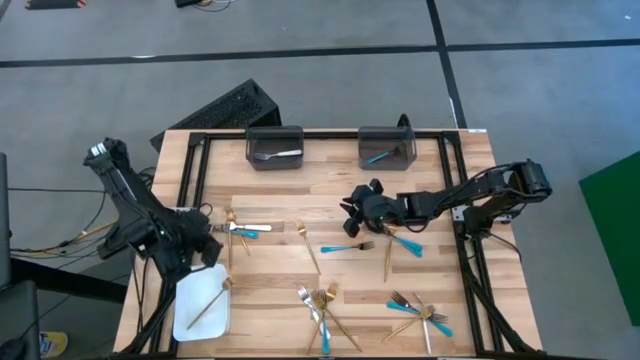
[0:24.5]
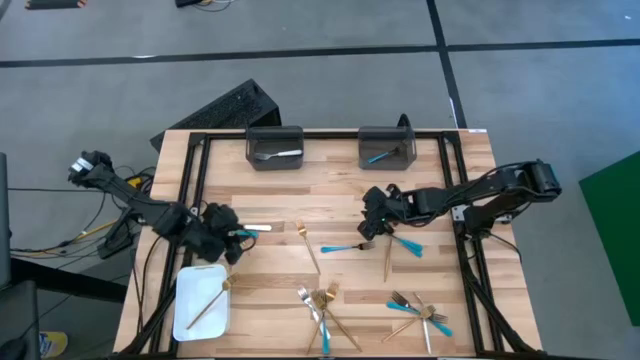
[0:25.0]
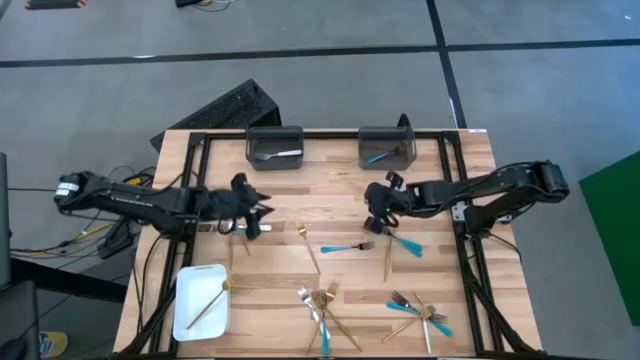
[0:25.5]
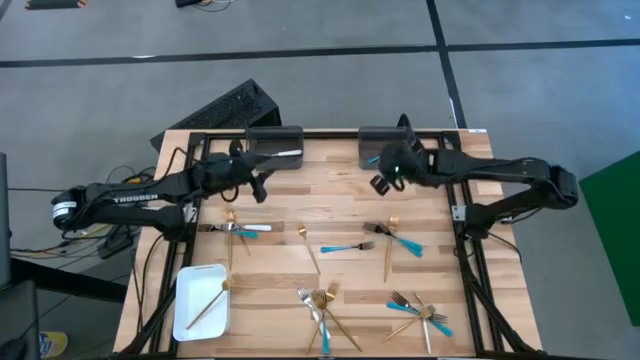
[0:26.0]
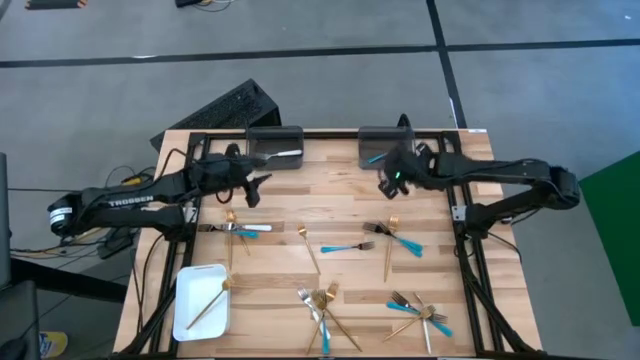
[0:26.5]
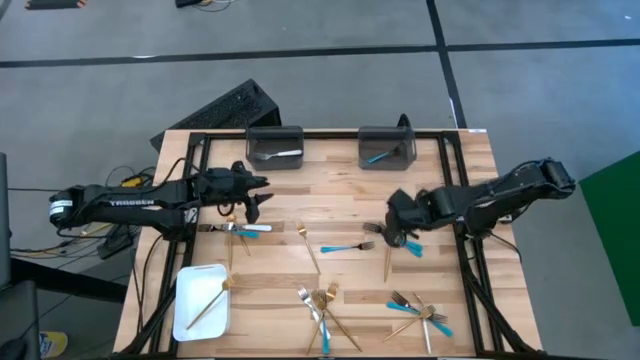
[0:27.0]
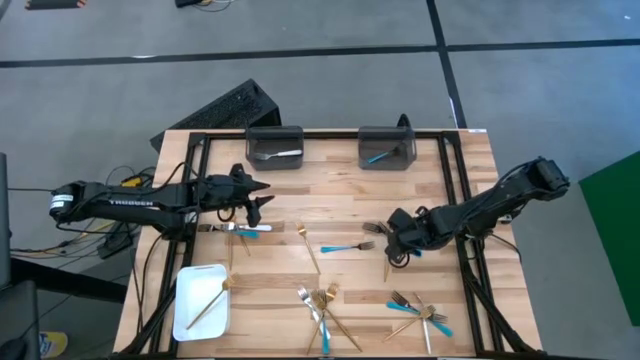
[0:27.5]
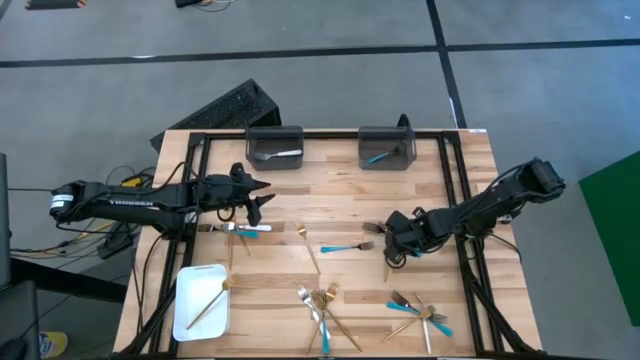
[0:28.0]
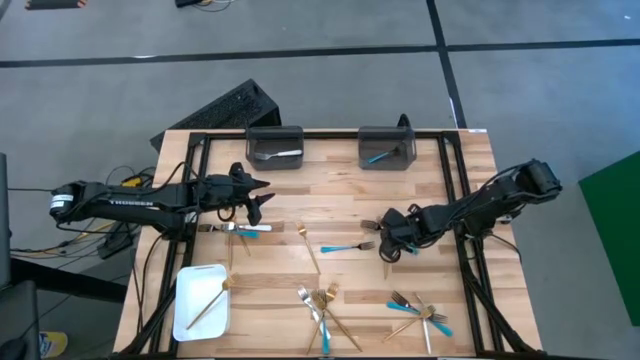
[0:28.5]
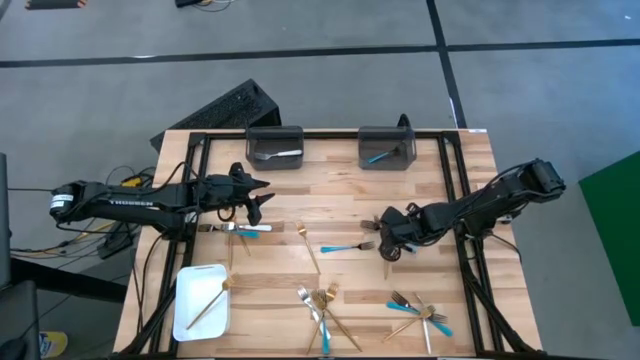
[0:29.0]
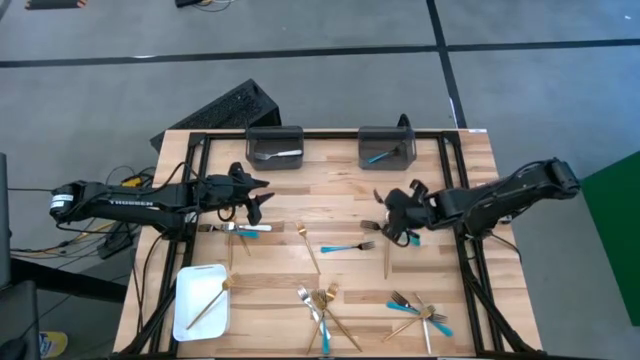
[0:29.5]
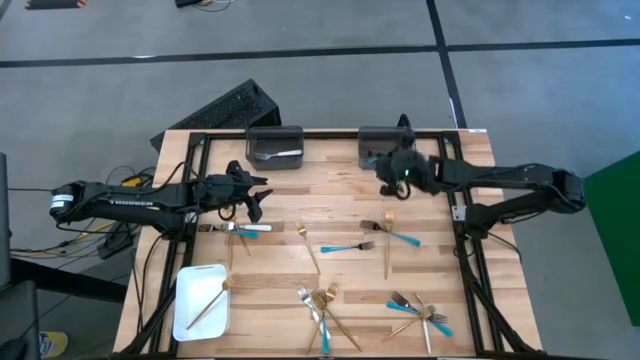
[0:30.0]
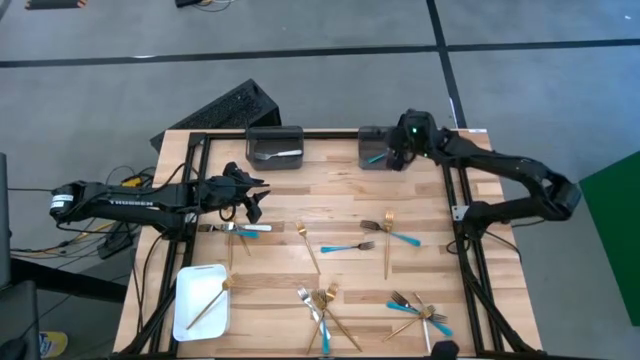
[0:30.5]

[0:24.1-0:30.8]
Task: Sort silverware by color (type)
Put the blue fork into the right black bin

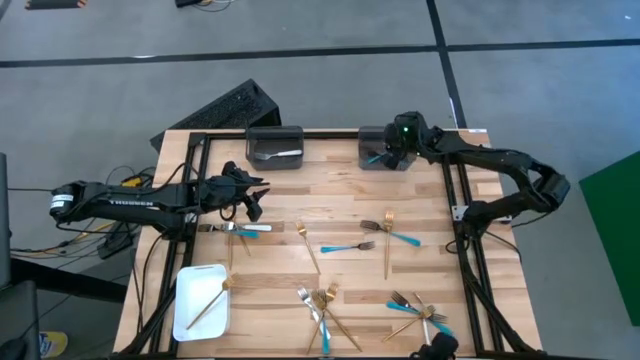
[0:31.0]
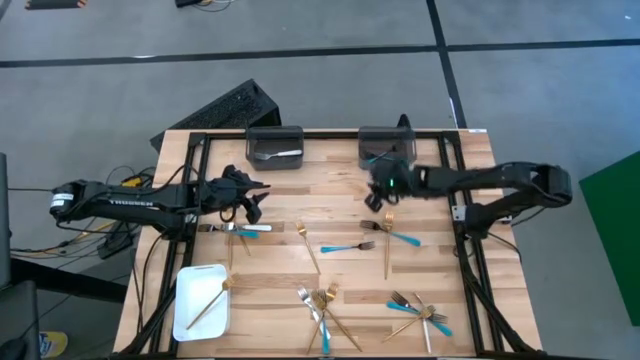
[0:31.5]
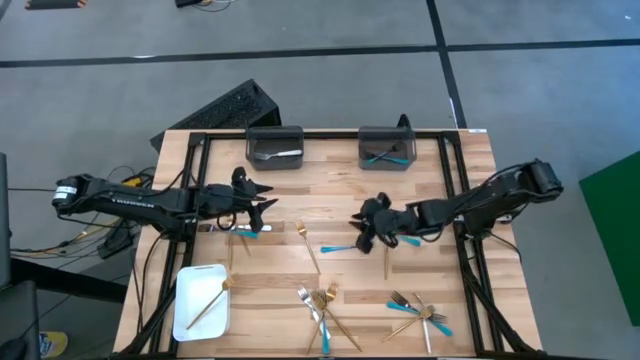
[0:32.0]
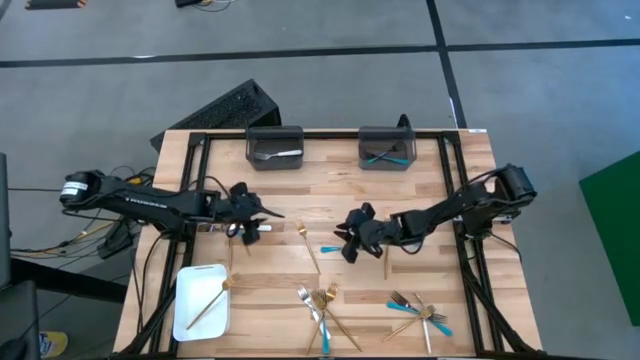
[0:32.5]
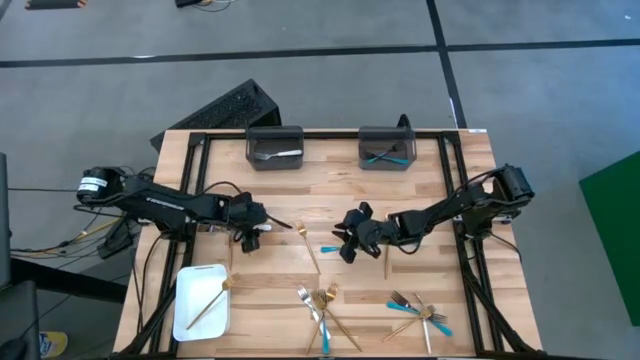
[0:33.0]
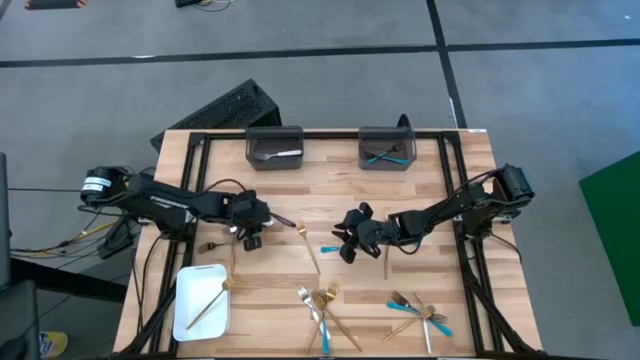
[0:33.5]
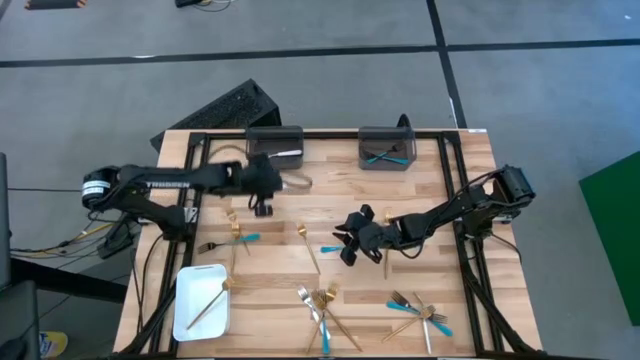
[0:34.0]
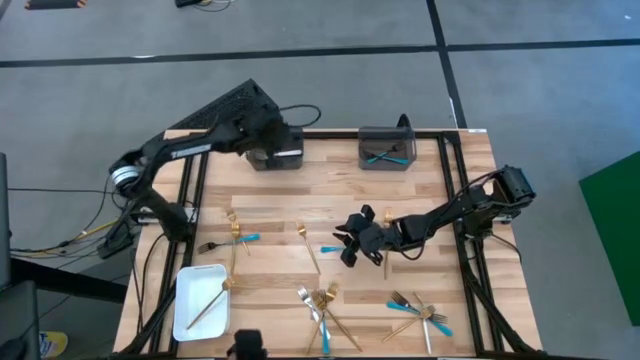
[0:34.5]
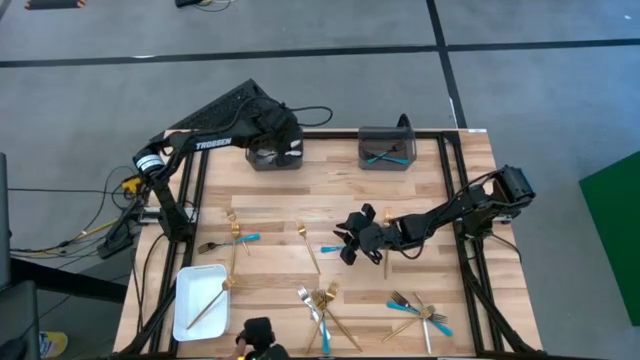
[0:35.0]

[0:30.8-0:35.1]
Put the white fork into the left black bin

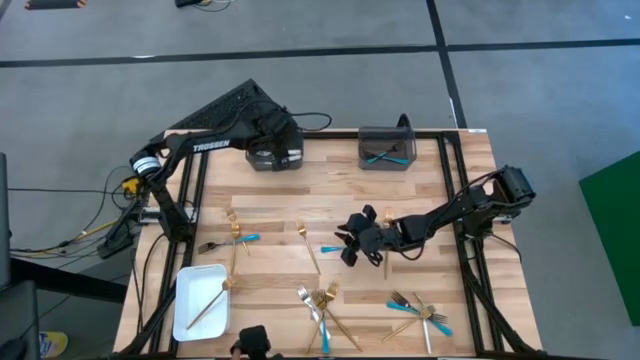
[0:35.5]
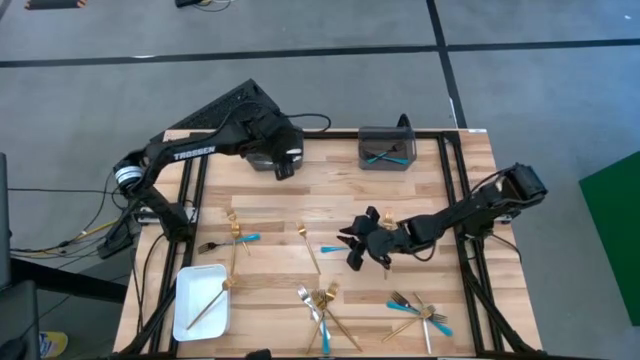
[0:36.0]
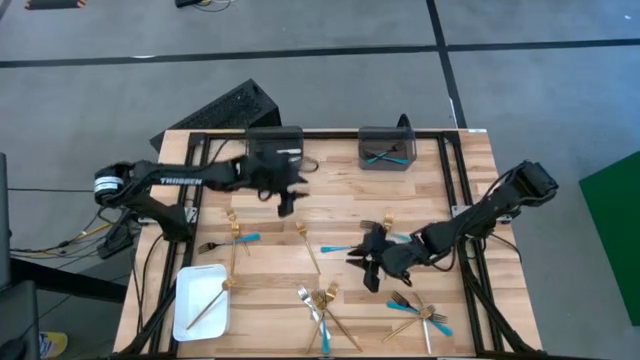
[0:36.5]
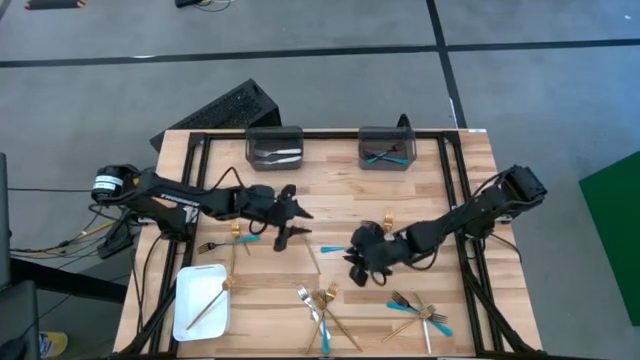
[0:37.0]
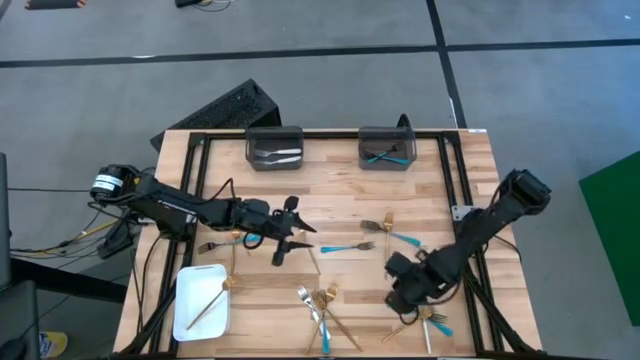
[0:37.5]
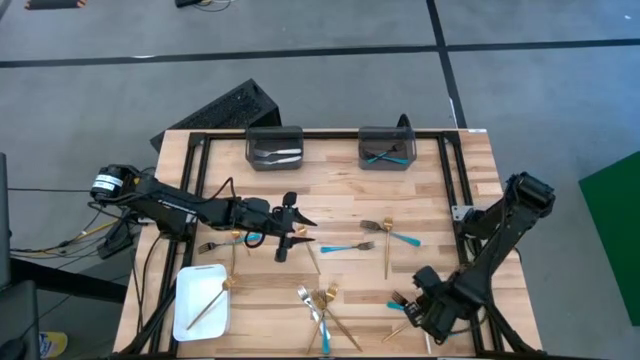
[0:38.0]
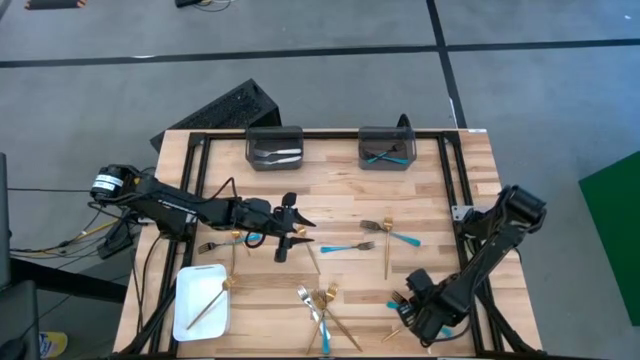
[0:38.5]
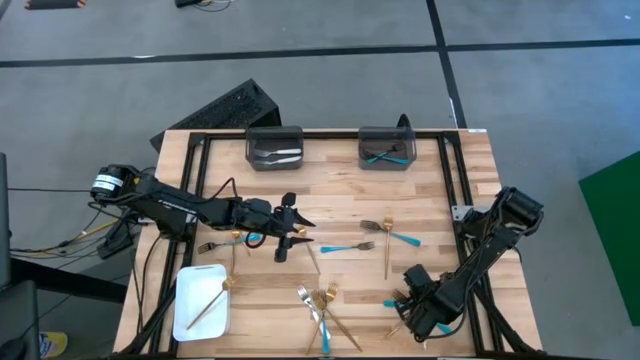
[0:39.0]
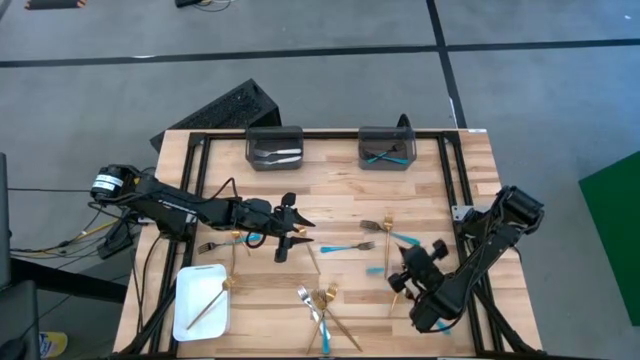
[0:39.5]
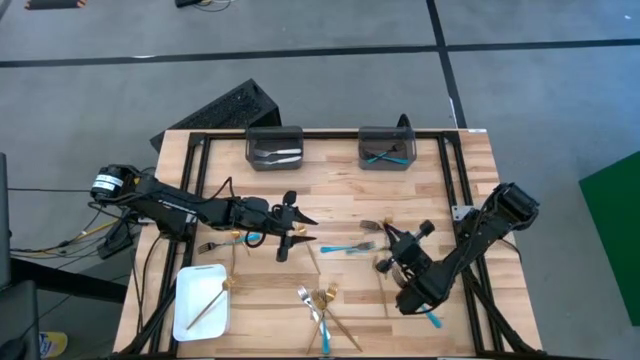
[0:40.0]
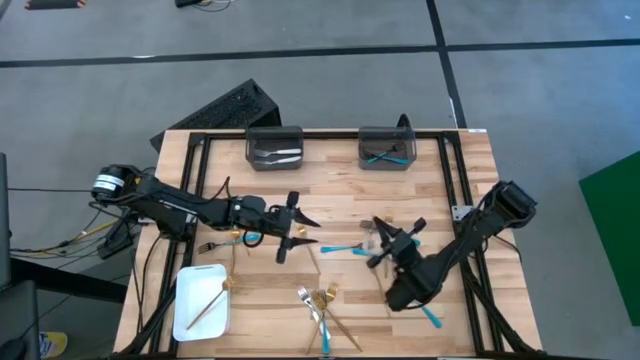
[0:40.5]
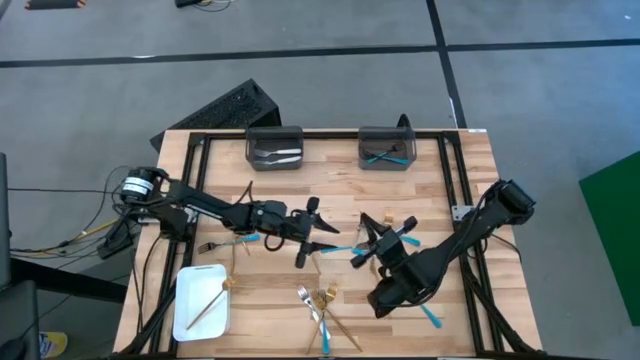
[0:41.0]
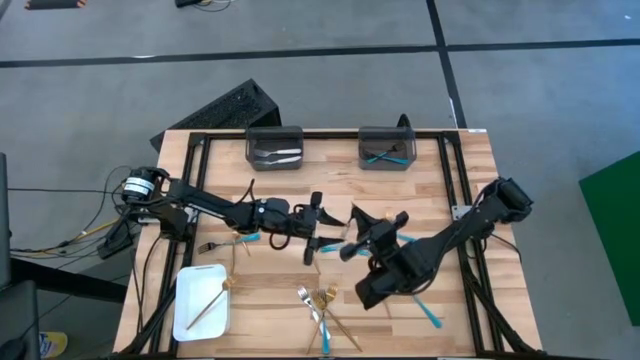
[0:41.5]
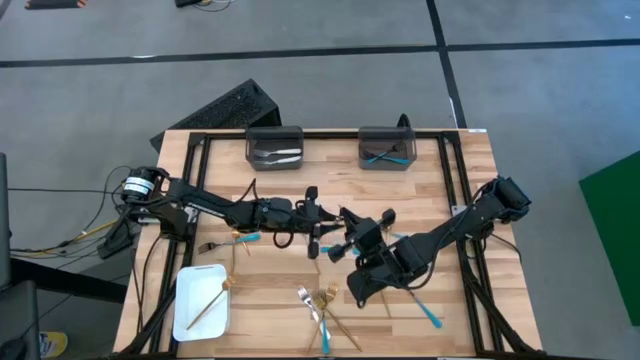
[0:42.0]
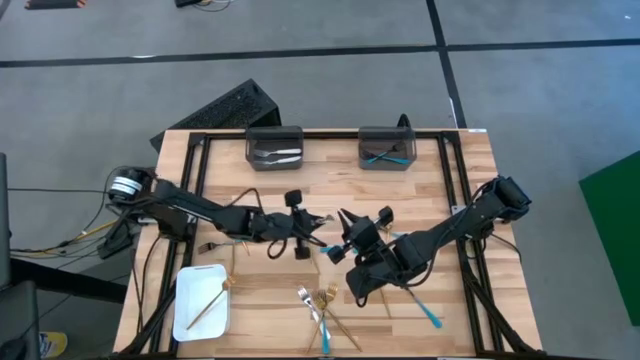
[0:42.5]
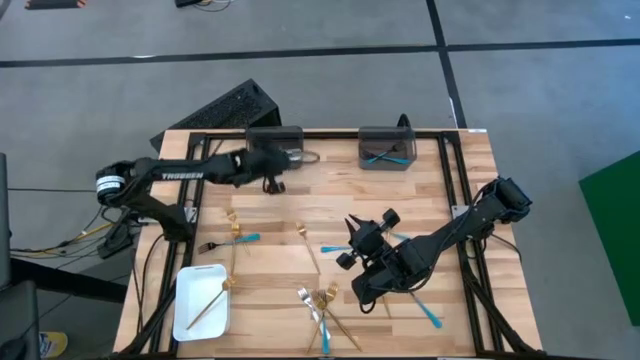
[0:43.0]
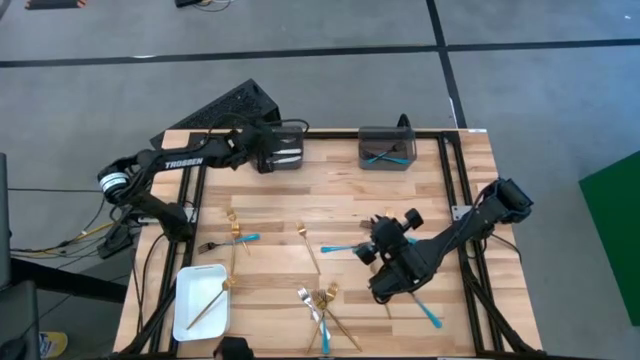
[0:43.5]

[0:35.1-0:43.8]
Put the white fork into the left black bin

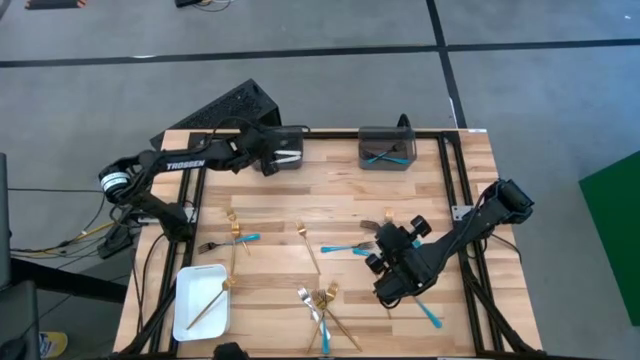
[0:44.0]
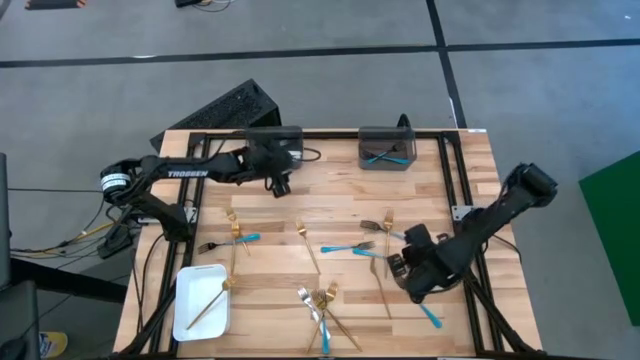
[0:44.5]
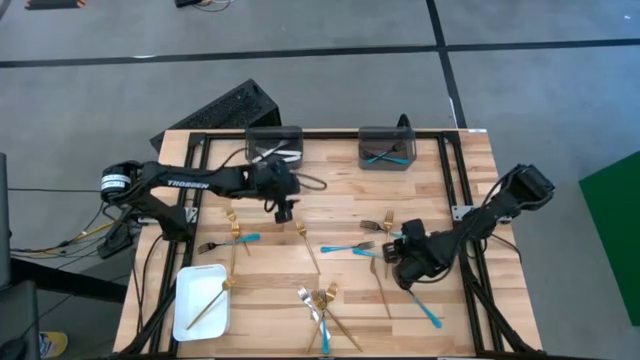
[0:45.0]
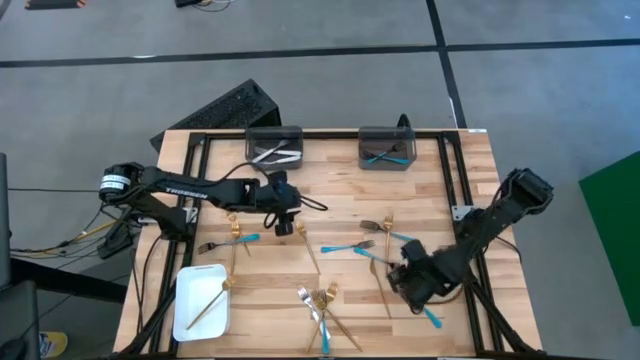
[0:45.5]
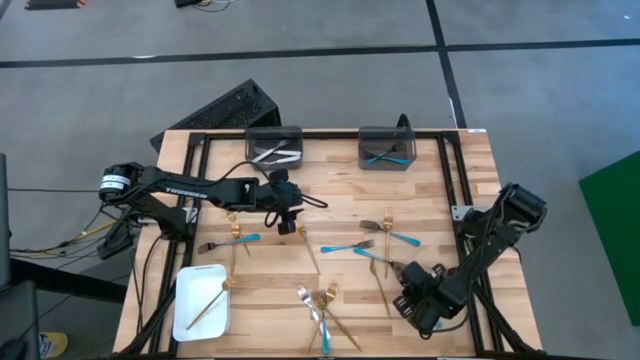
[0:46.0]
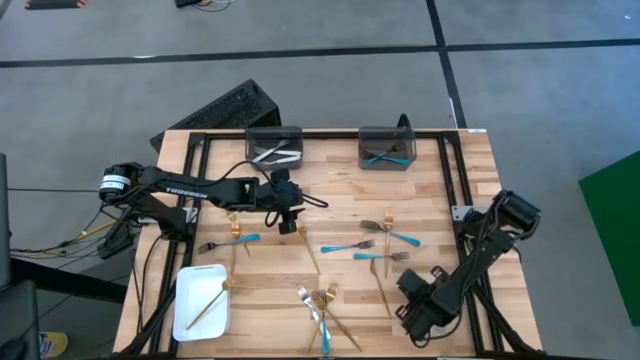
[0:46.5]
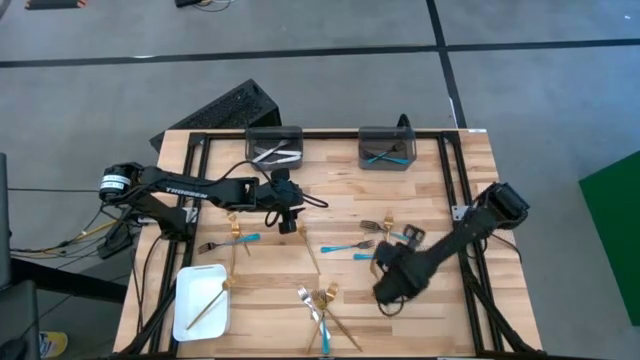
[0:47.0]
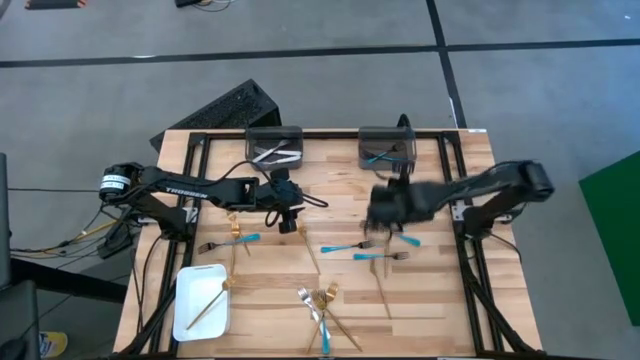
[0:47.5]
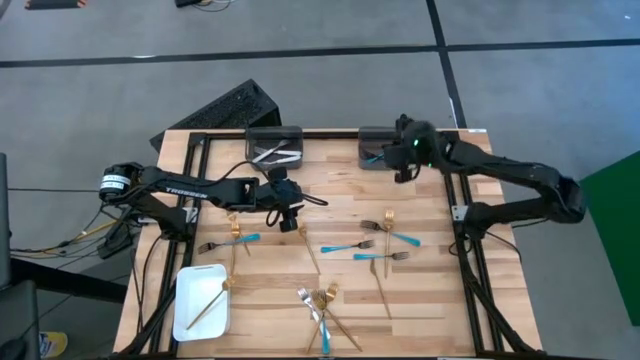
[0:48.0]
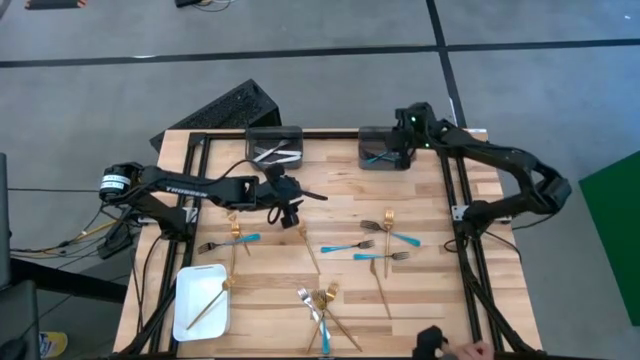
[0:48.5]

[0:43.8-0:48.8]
Put the blue fork into the right black bin
